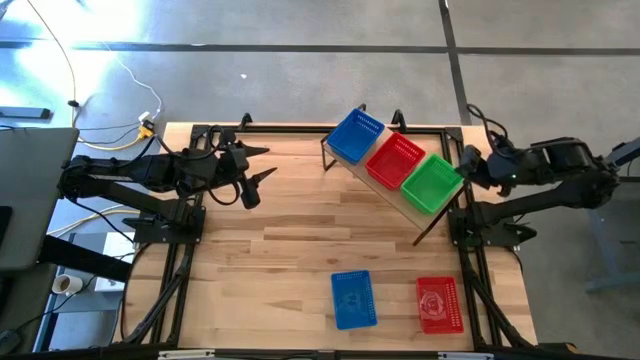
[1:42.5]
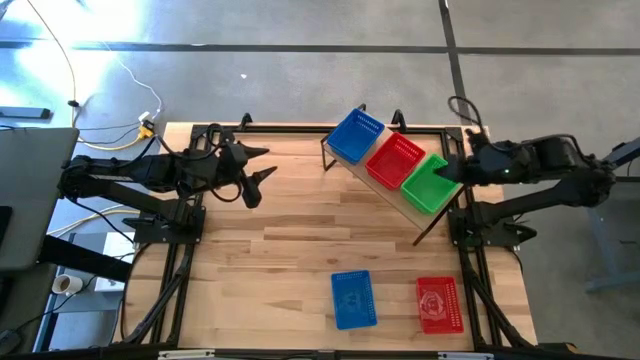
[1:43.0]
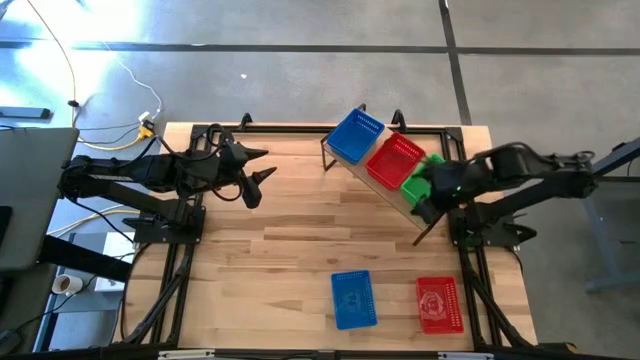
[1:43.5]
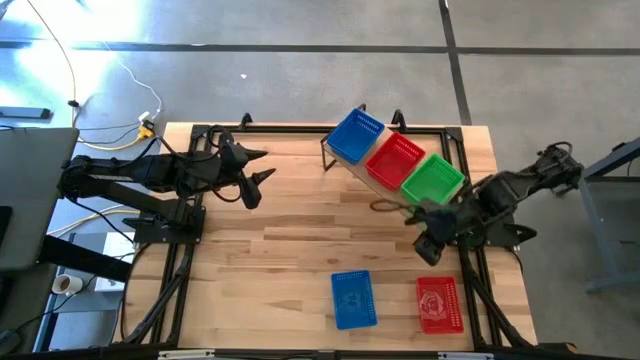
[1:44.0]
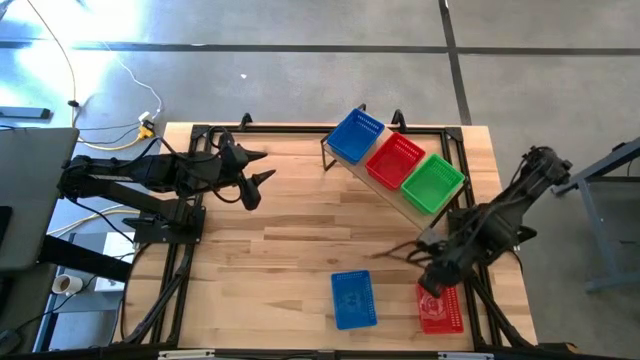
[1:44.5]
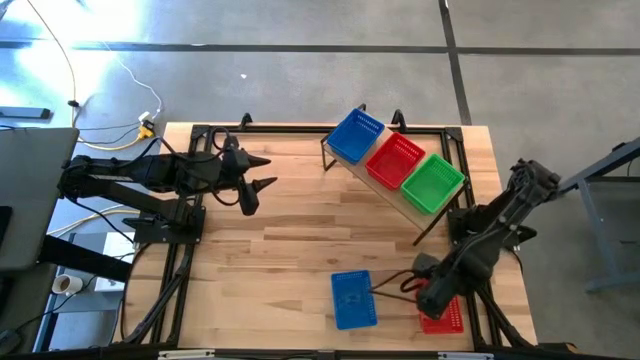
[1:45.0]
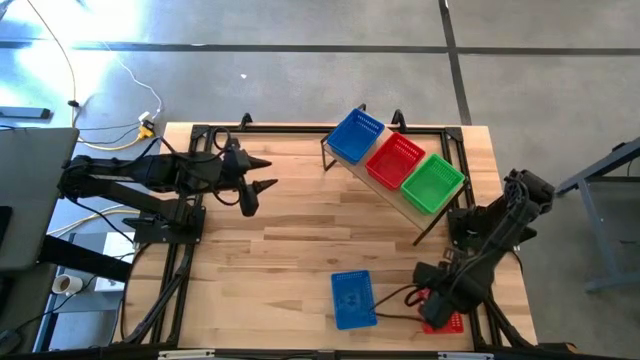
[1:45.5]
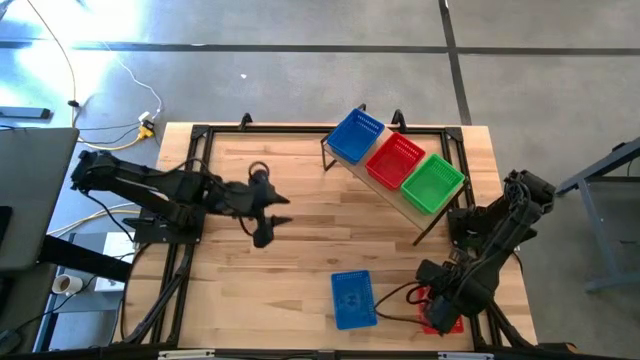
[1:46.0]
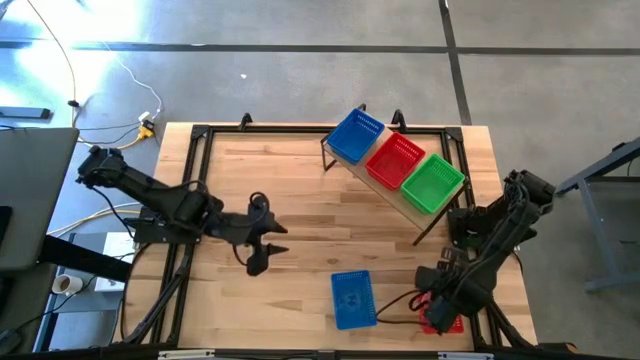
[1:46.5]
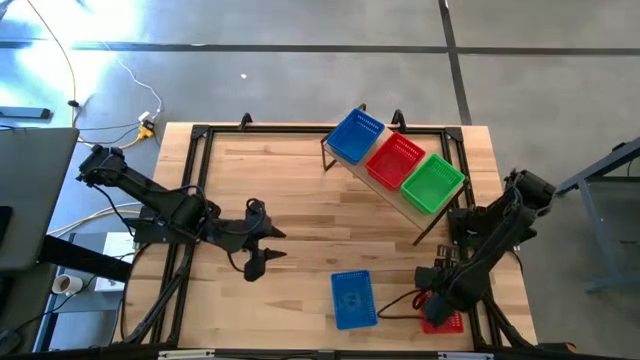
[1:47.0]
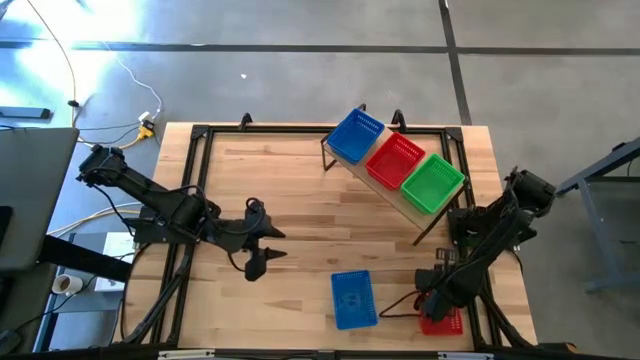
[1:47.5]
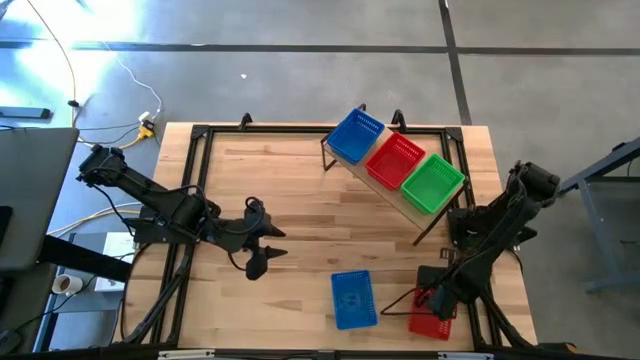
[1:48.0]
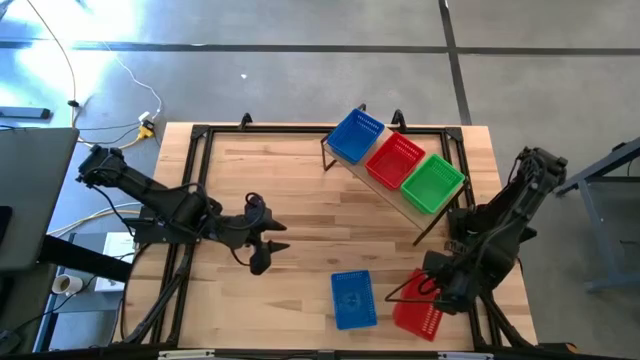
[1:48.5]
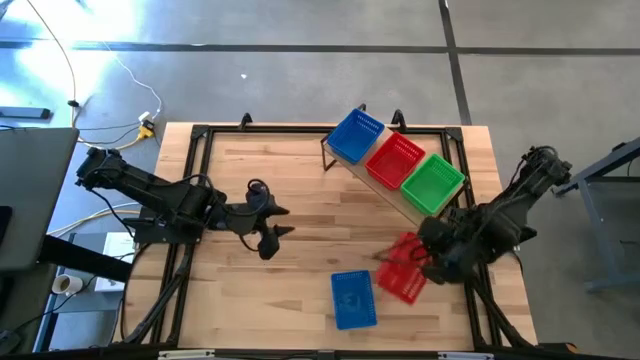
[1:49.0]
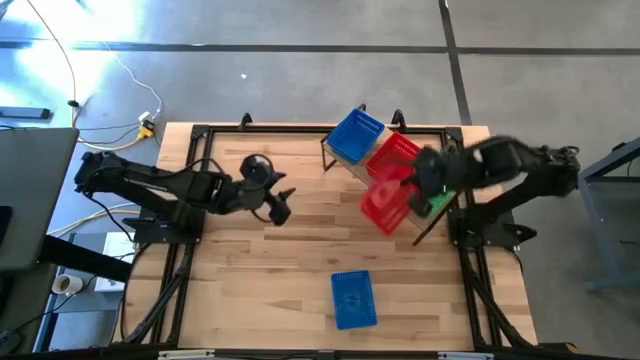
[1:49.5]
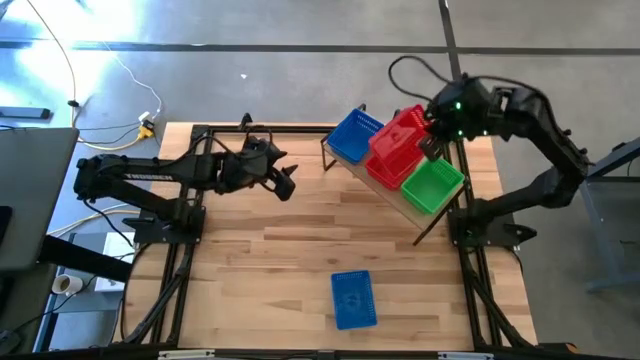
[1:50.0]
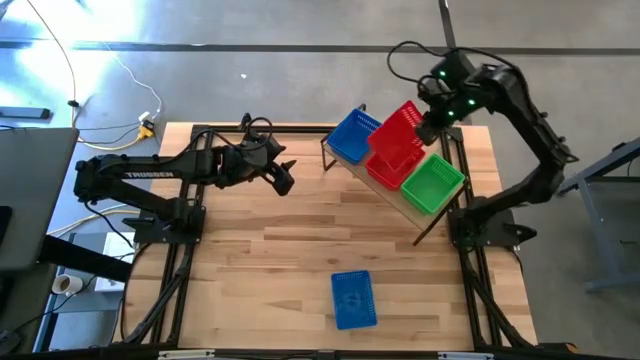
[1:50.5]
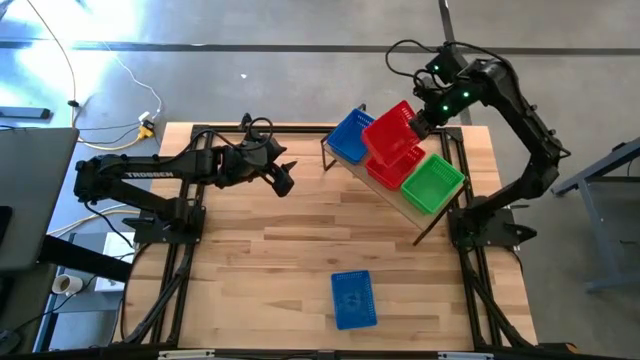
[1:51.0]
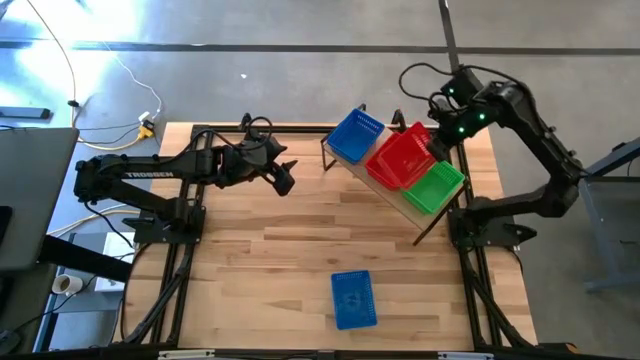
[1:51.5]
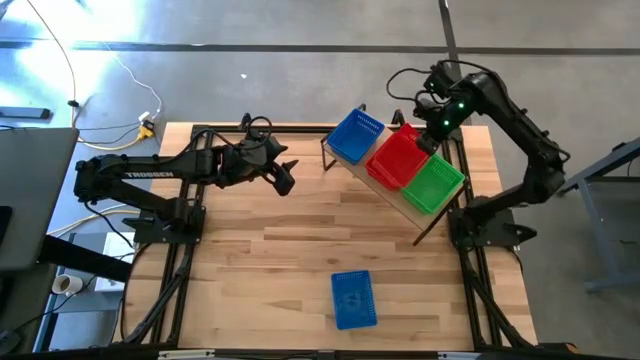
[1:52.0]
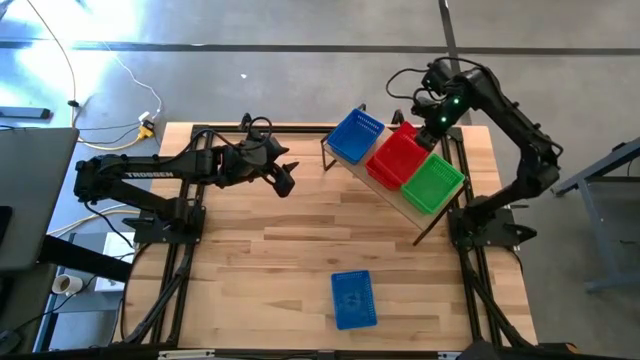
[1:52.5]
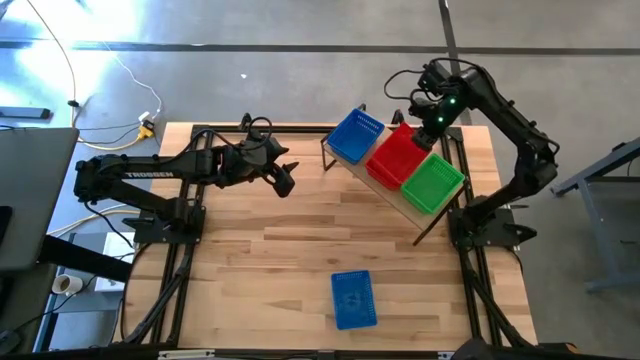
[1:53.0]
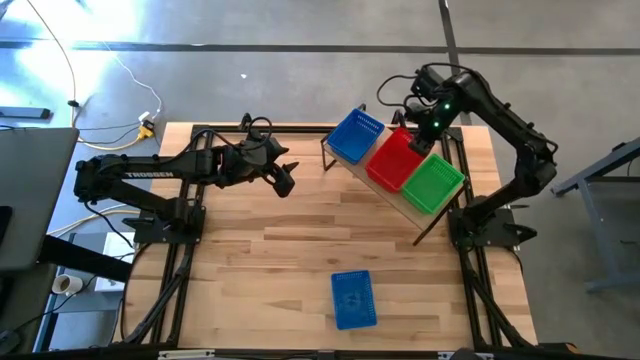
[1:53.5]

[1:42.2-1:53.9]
Task: Stack baskets on shelf by color
Stack the red basket on the stacked red basket on the shelf

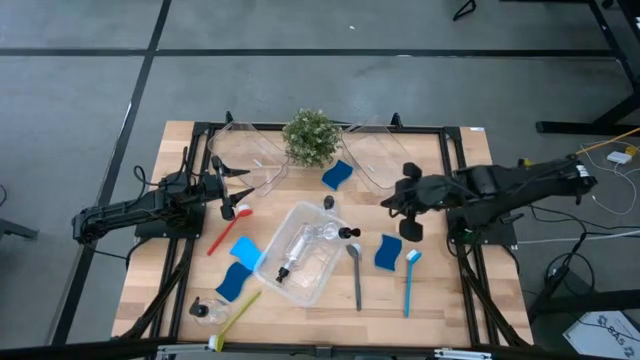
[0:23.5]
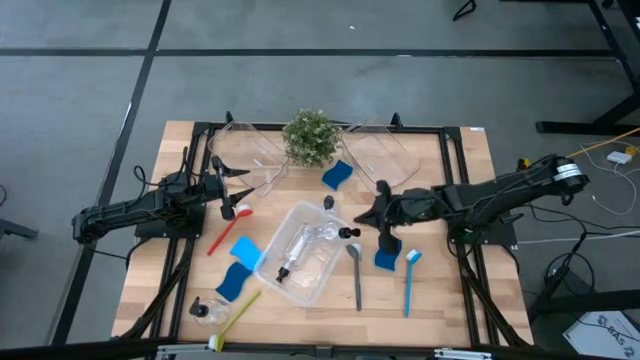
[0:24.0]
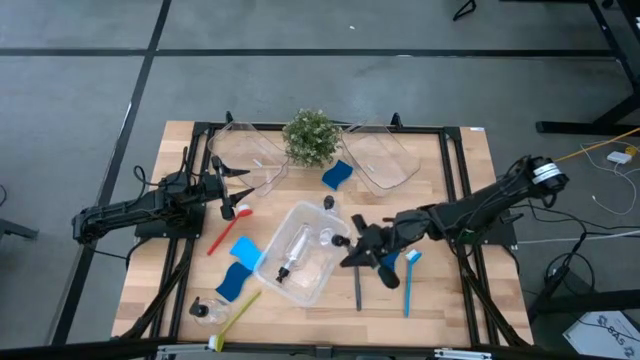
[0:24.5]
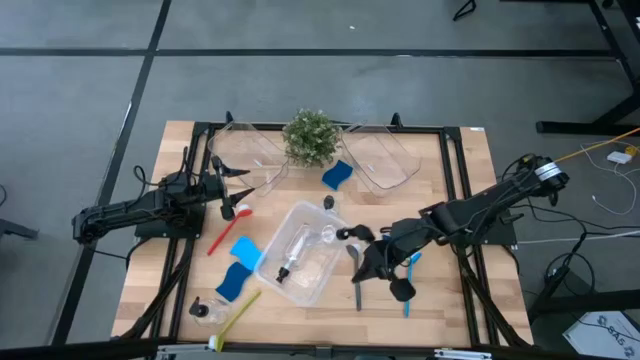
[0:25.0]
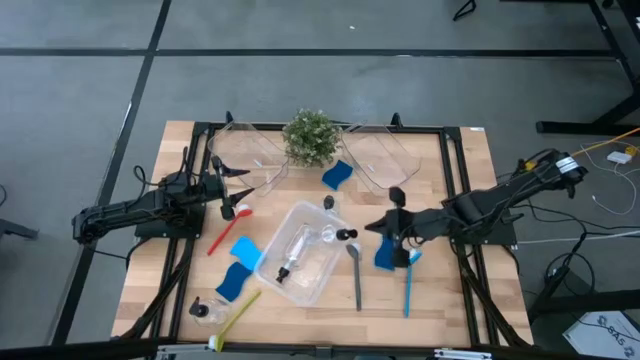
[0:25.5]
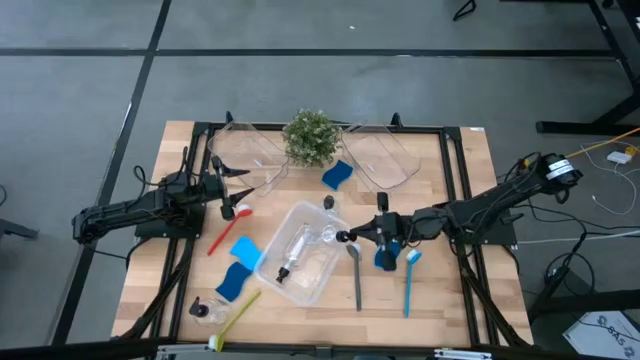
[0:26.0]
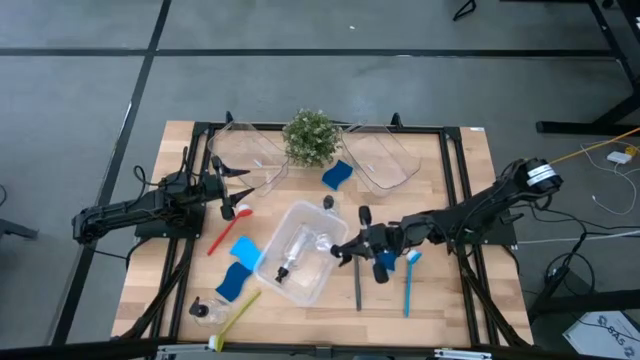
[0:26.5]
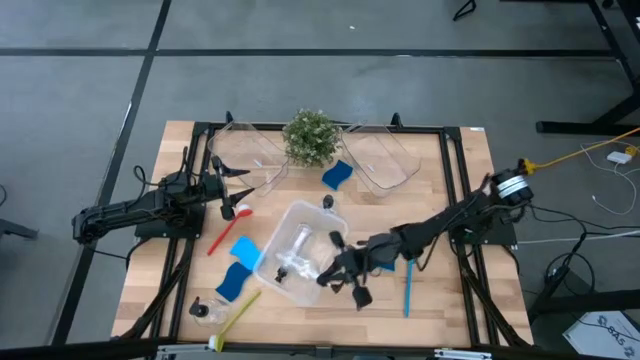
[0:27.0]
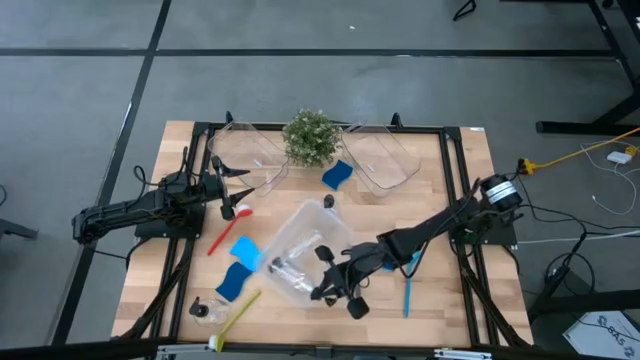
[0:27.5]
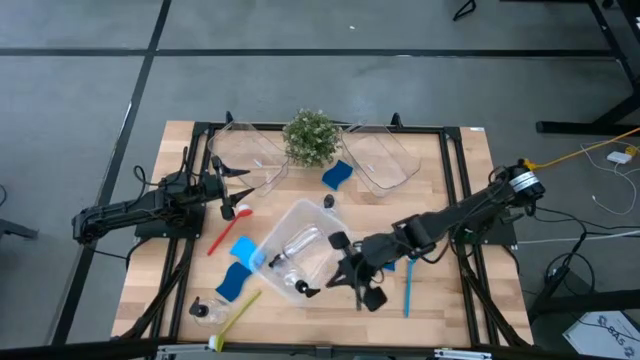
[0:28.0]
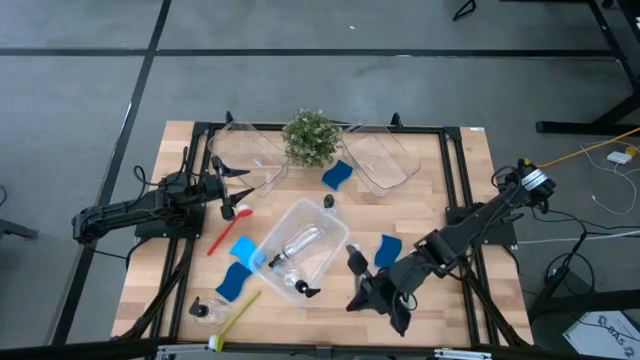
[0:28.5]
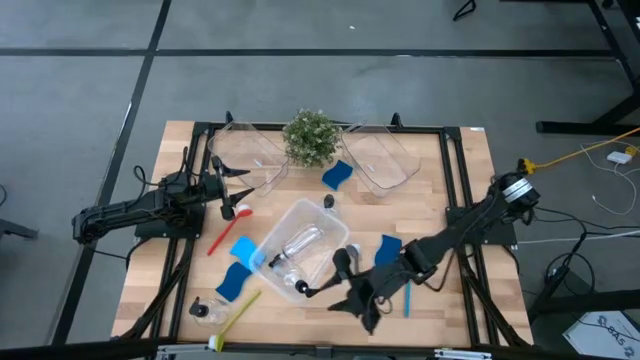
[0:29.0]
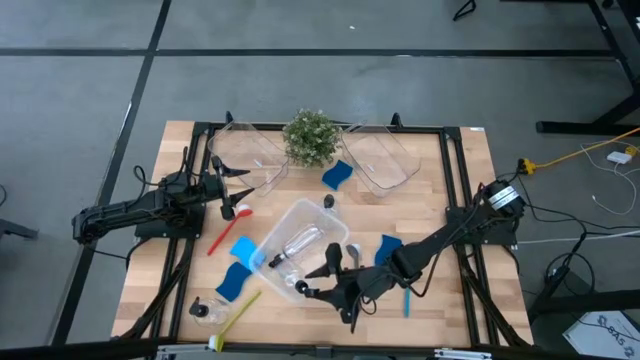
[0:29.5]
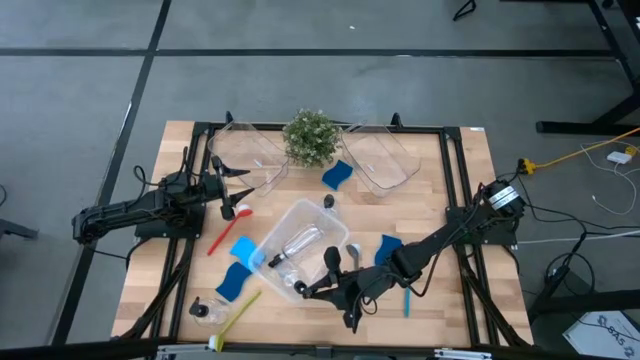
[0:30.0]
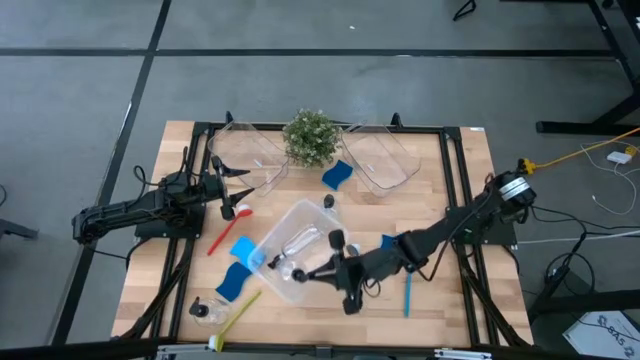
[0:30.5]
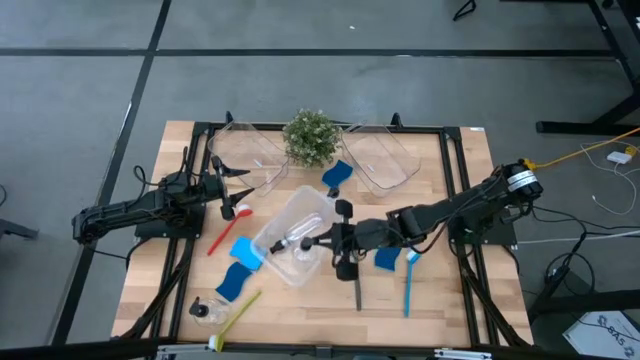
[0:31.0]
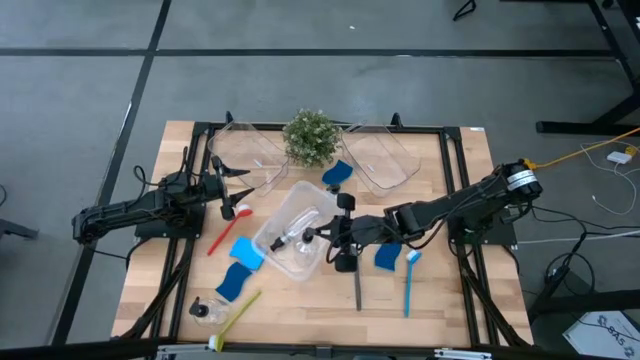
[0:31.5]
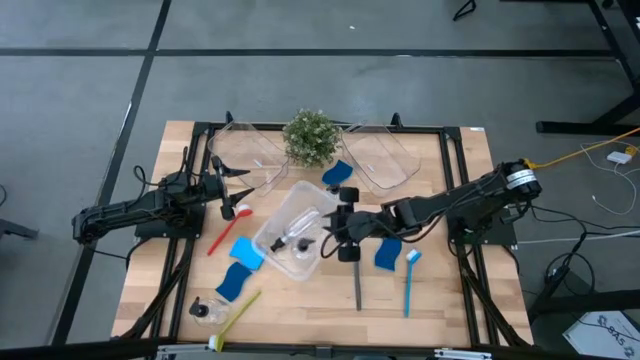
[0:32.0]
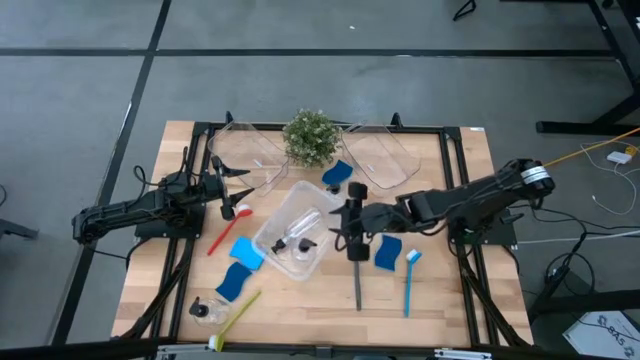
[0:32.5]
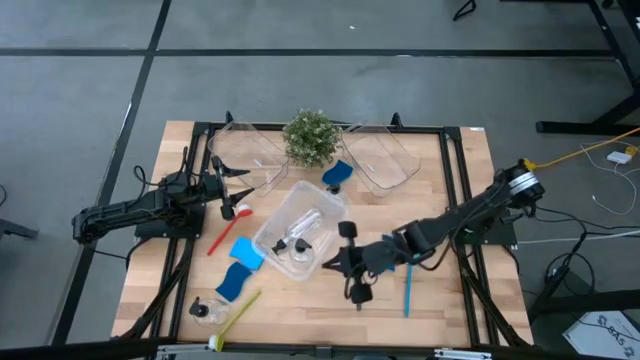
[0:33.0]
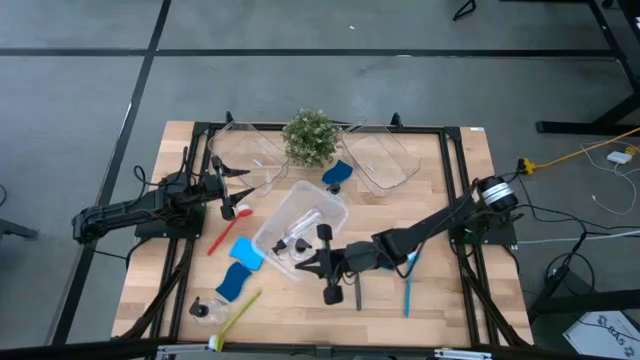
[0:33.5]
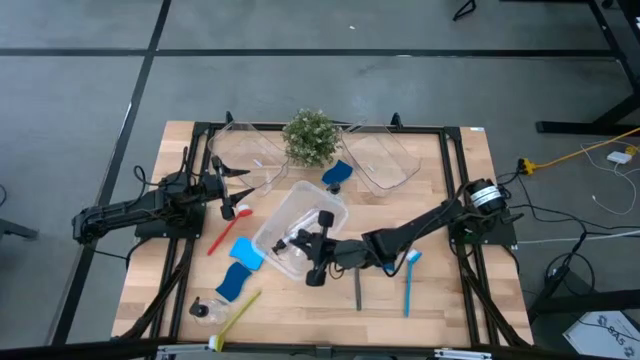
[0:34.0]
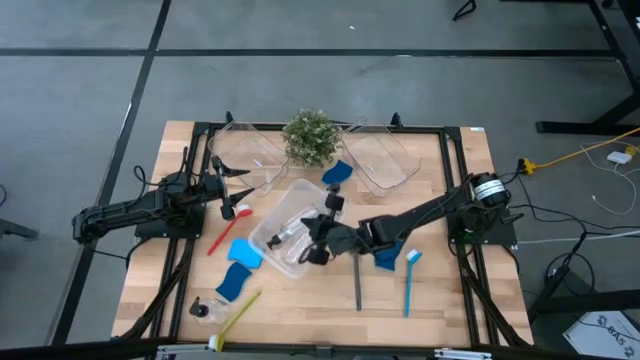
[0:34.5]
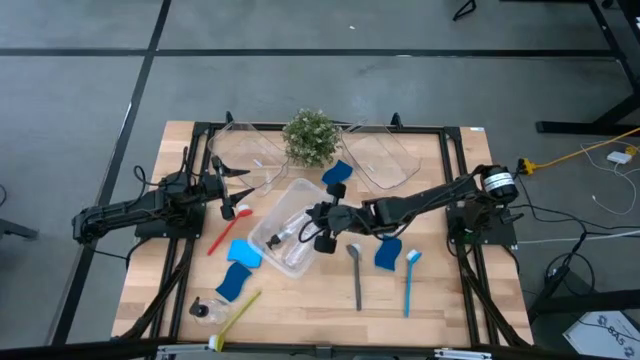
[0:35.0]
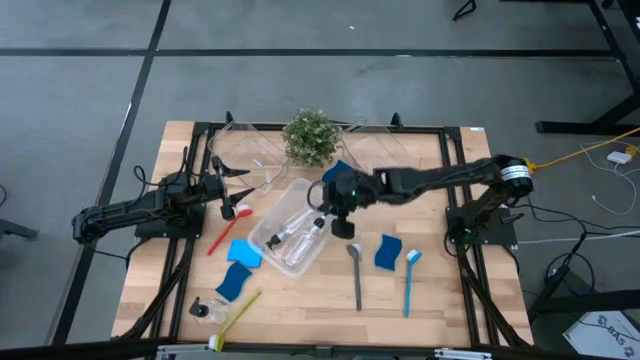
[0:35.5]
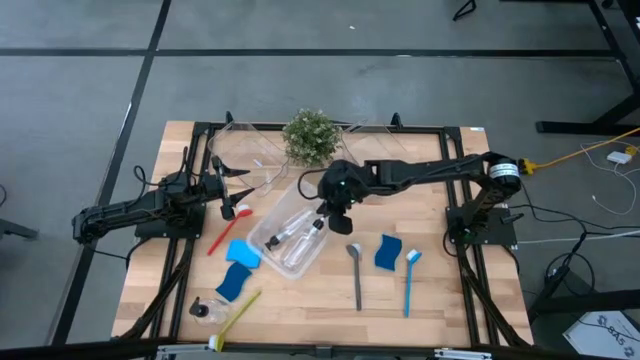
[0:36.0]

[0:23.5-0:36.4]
Task: Pick & Place Kitchen Sink Supplies
Put the liquid dispenser bottle into the white bin
